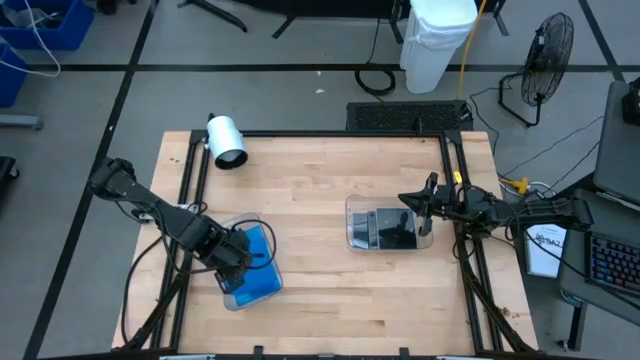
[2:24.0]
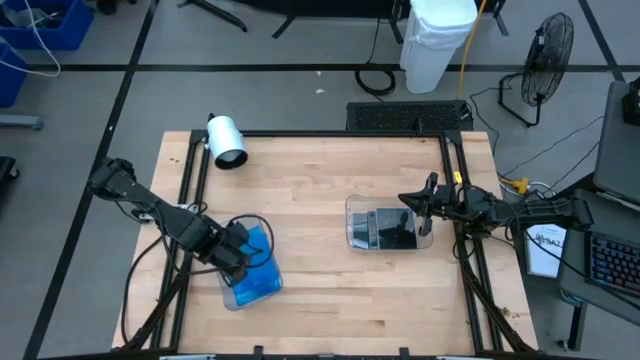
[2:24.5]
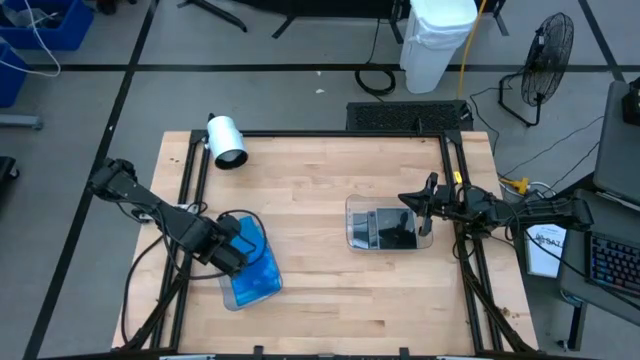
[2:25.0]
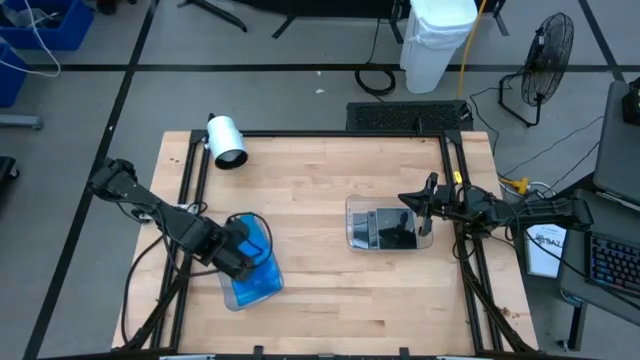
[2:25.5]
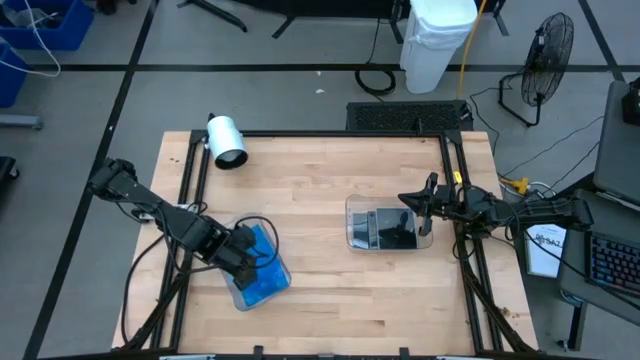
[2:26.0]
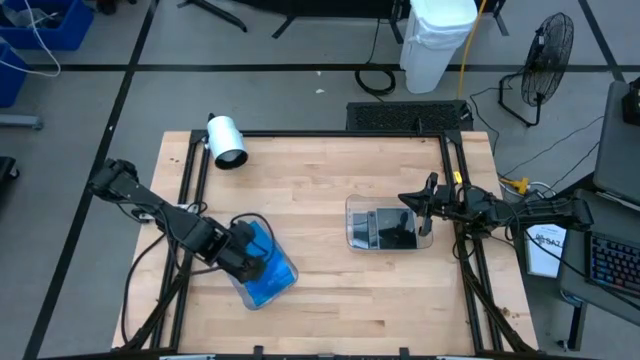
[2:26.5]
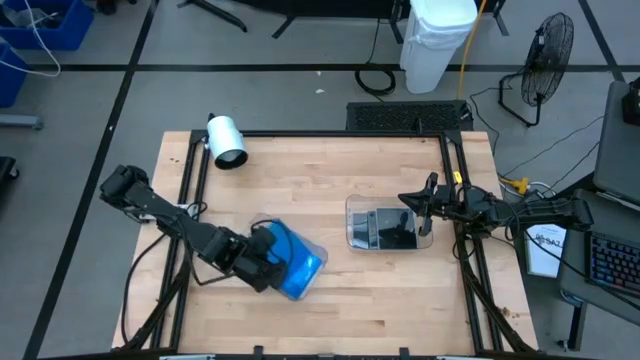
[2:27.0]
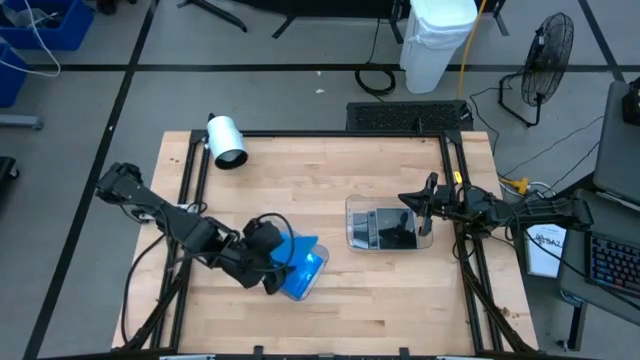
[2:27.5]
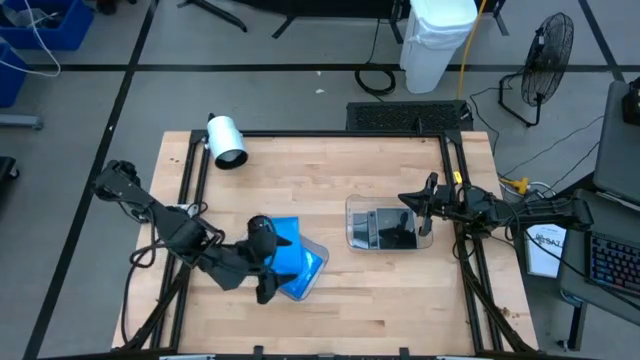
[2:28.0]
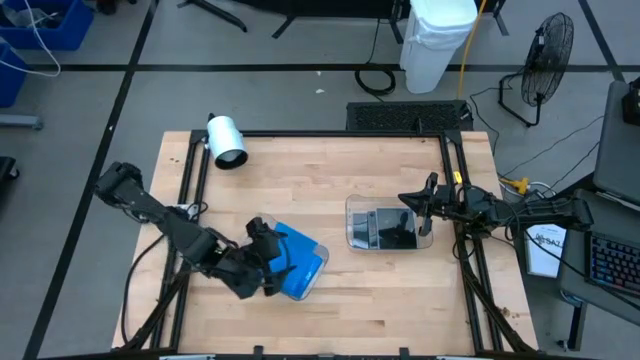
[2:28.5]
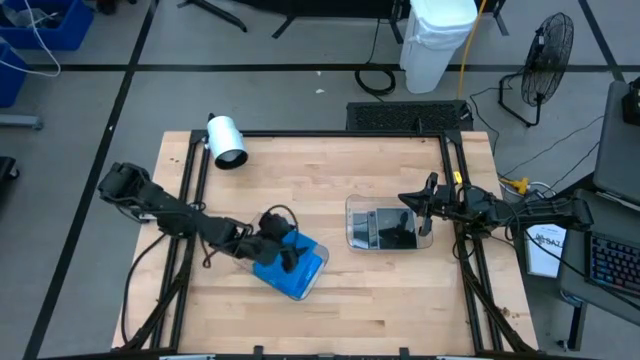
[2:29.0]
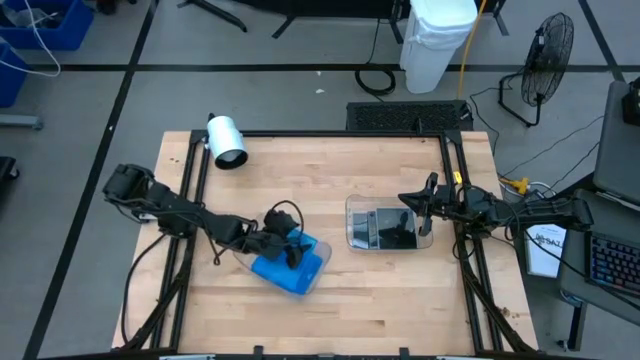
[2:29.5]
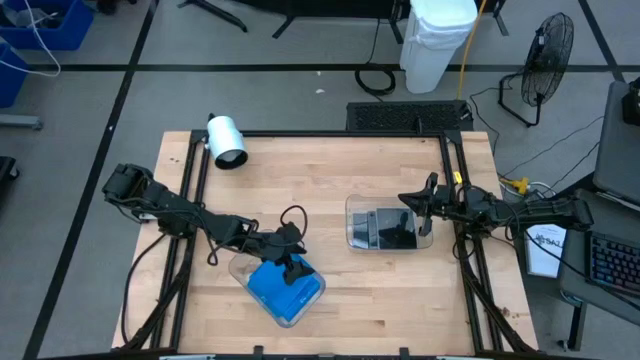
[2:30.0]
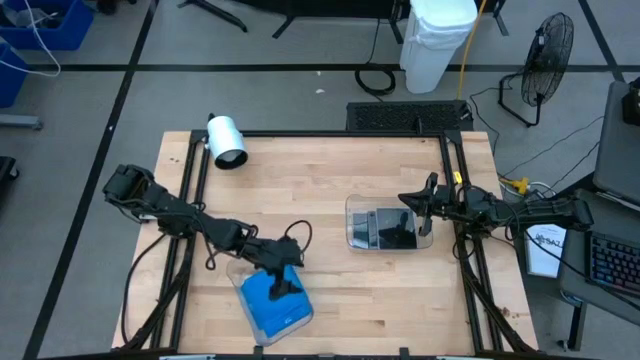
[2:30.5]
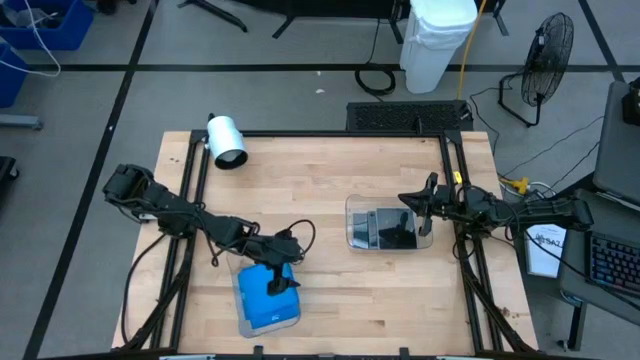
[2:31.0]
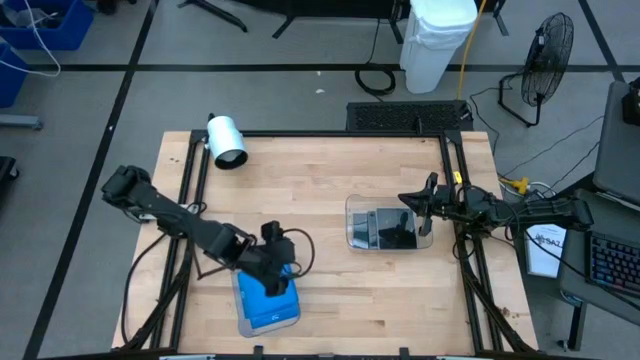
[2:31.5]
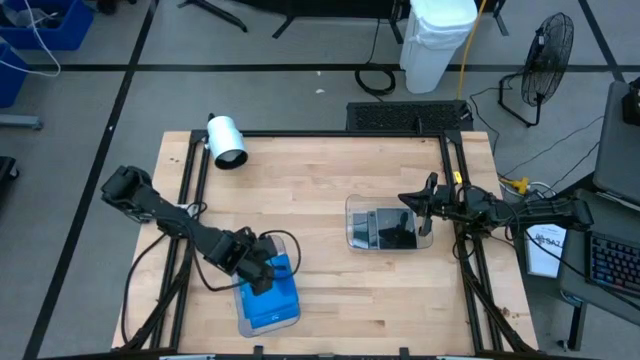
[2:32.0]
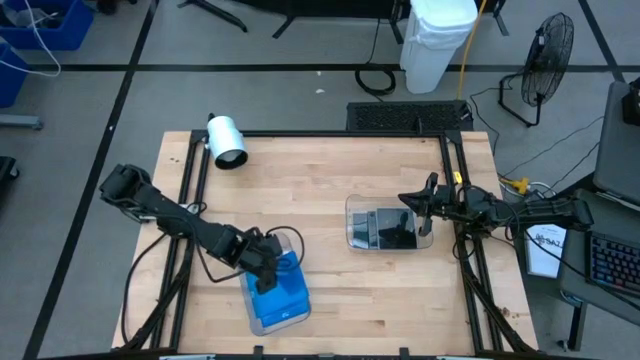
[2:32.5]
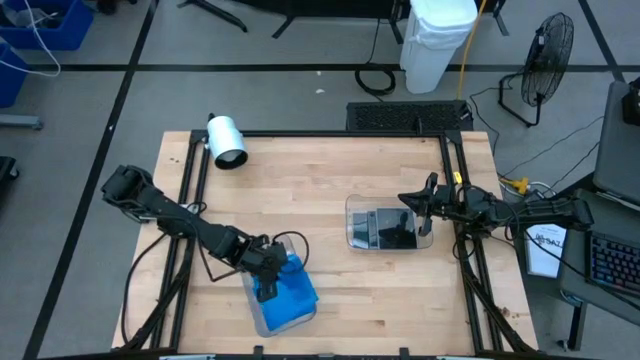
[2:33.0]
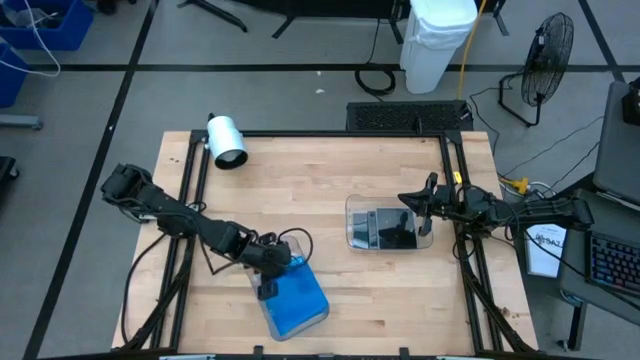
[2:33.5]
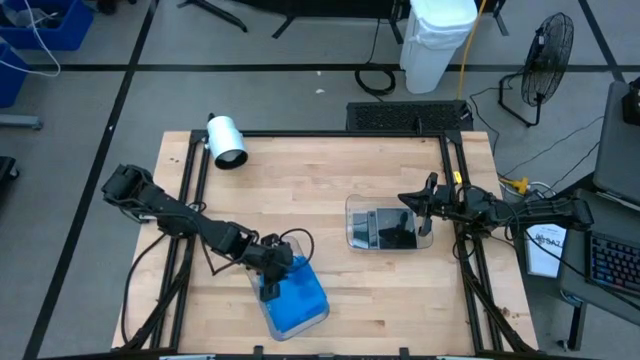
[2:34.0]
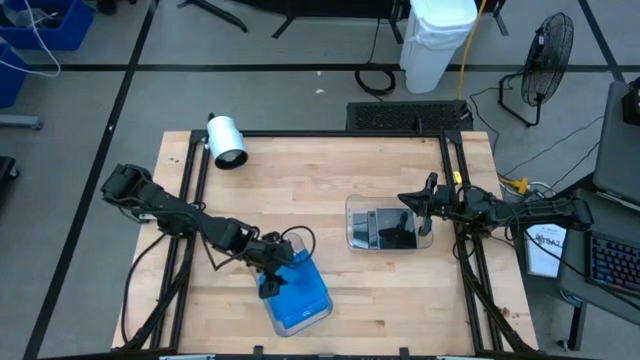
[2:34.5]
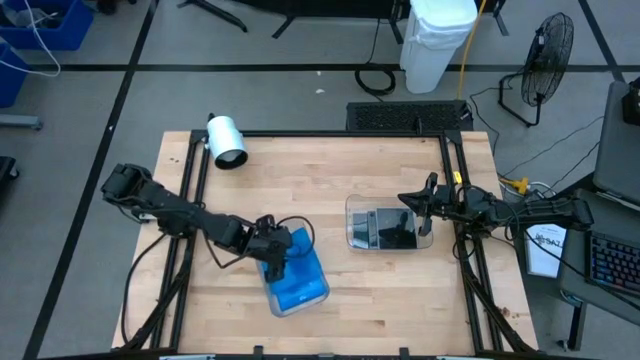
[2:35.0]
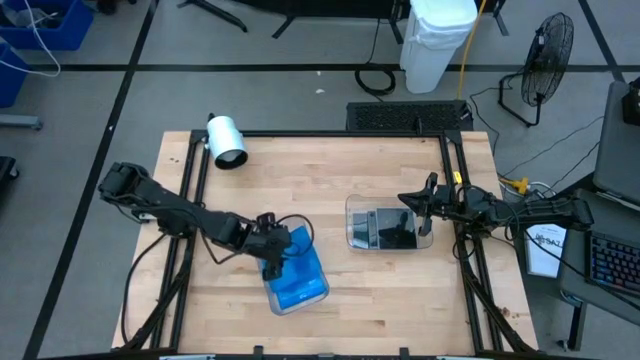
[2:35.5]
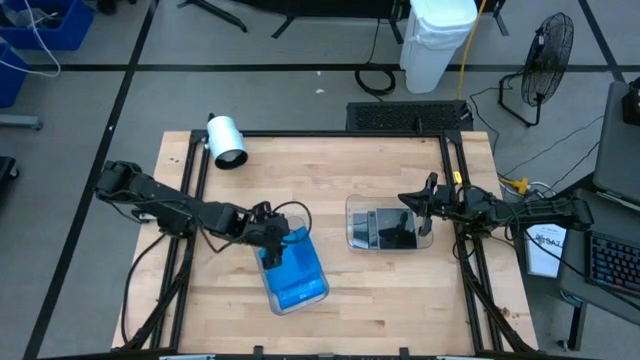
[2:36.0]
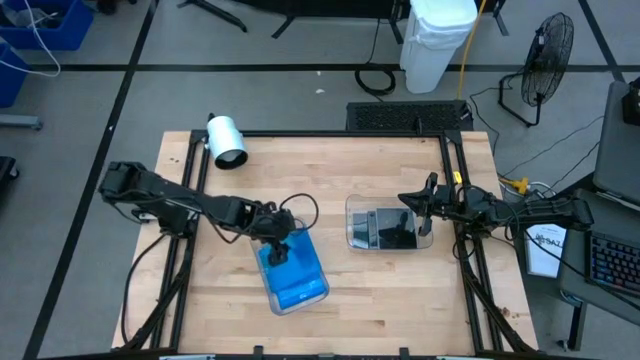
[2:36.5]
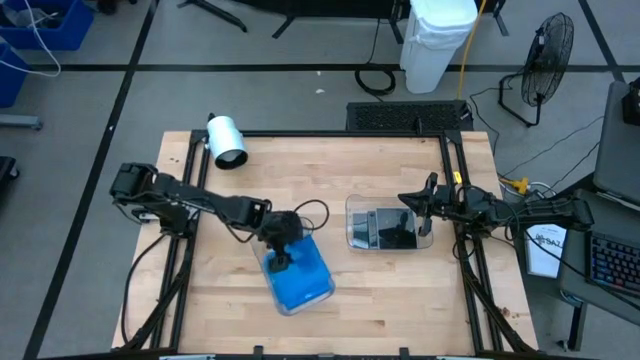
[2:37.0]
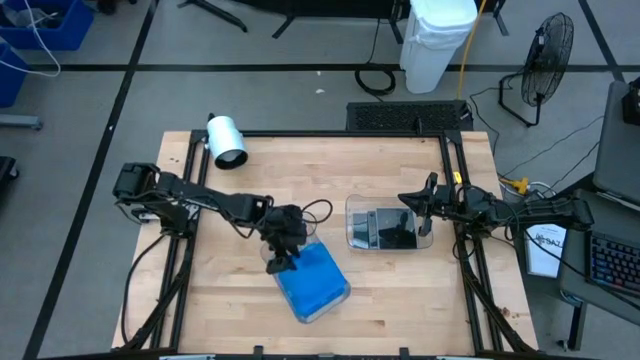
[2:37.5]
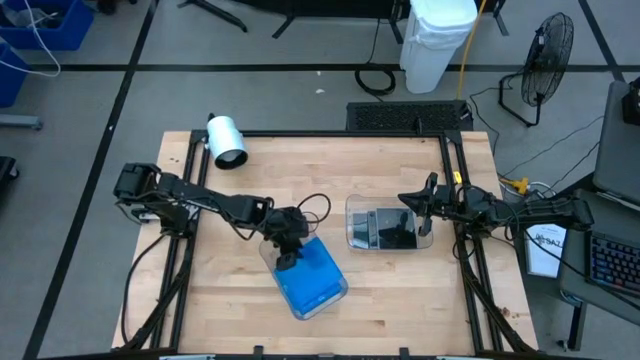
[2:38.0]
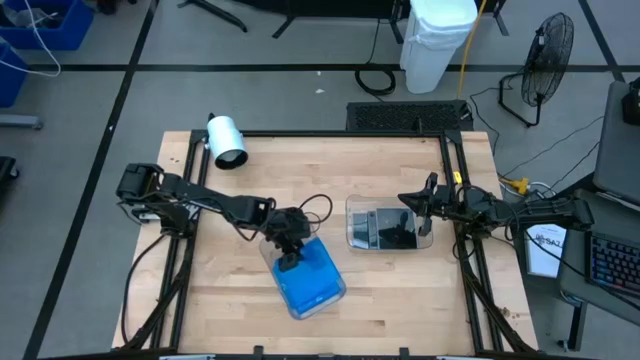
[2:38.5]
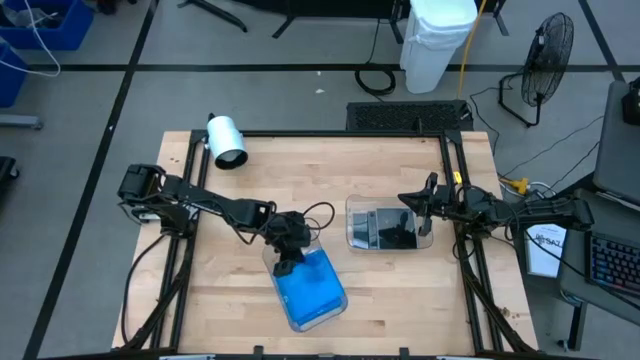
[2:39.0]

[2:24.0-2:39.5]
Task: Pick & place jewel cases by type
Put the blue CD case into the left transparent bin

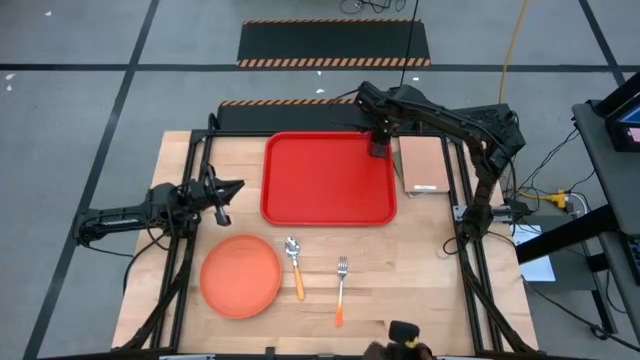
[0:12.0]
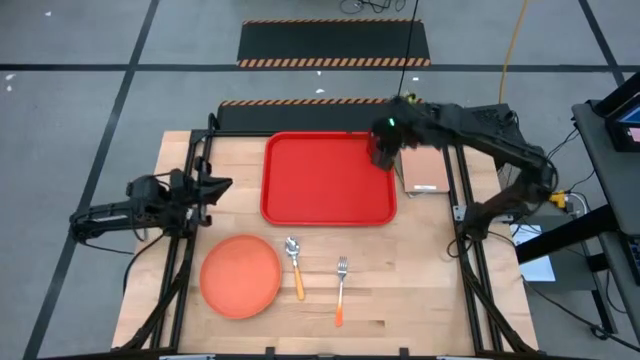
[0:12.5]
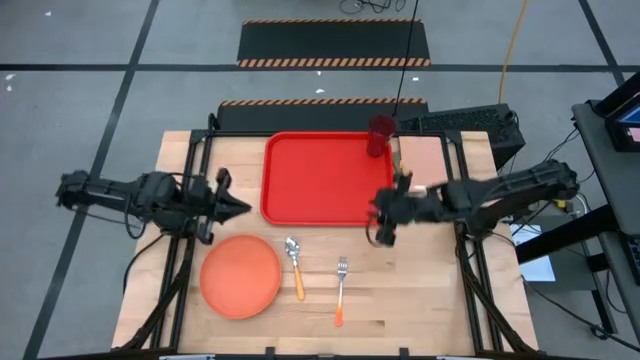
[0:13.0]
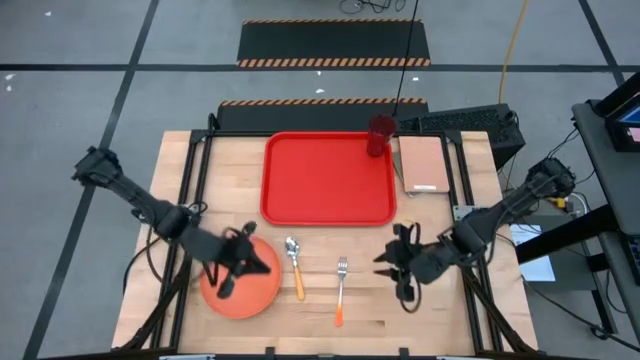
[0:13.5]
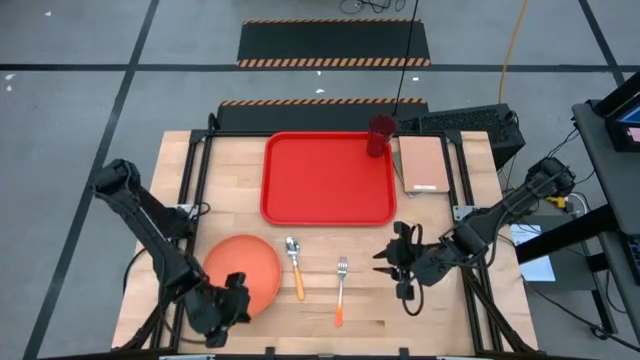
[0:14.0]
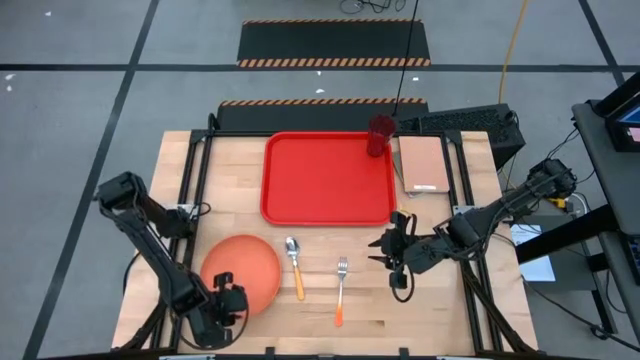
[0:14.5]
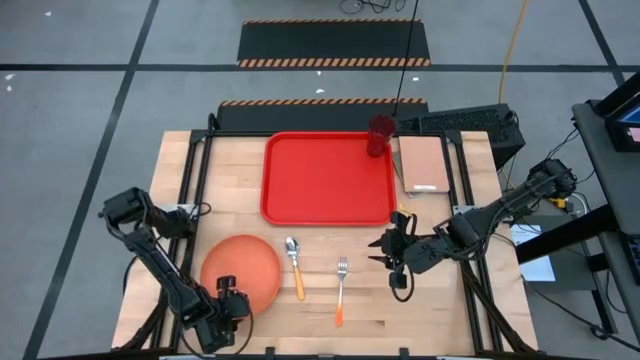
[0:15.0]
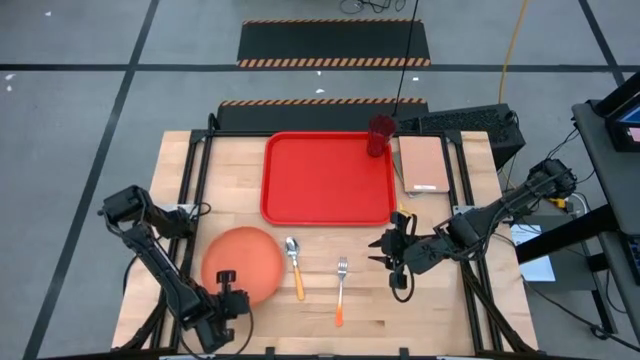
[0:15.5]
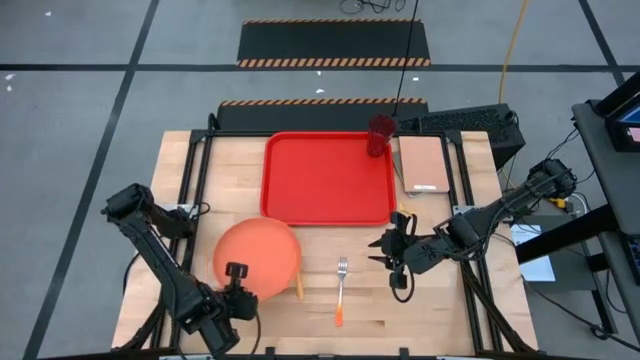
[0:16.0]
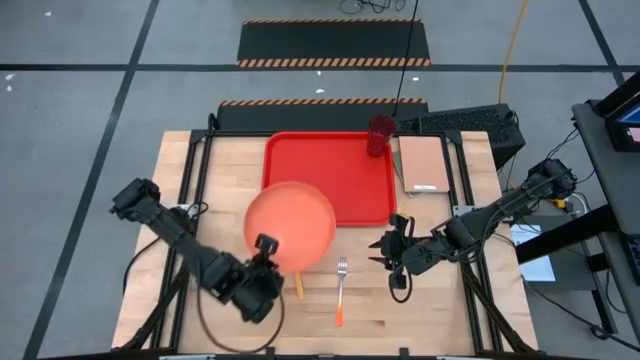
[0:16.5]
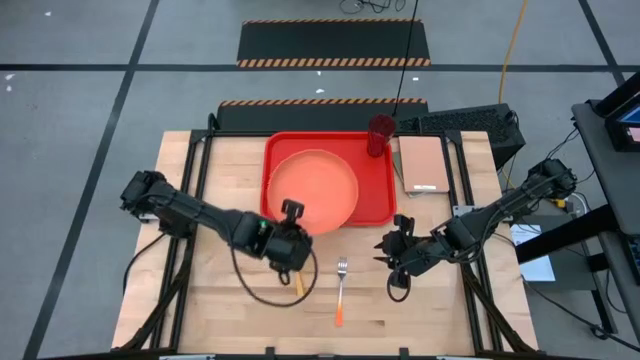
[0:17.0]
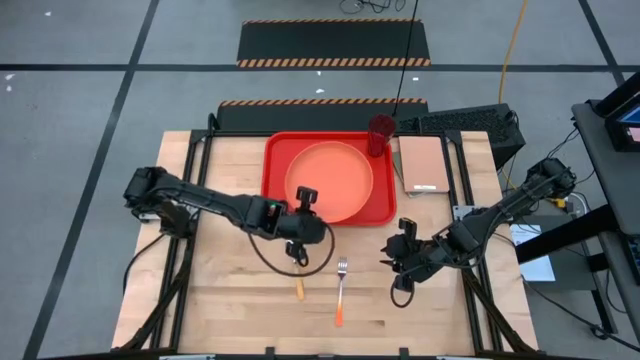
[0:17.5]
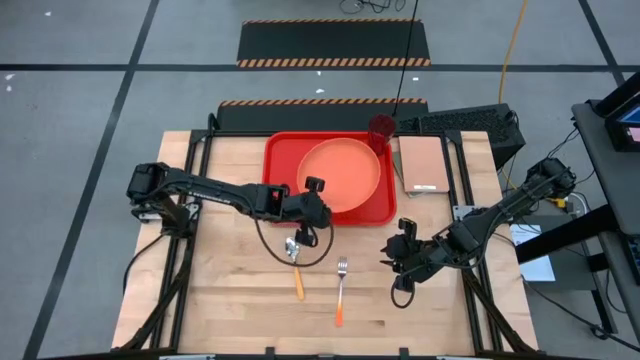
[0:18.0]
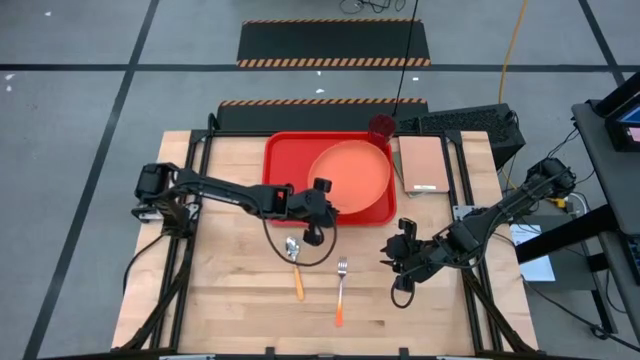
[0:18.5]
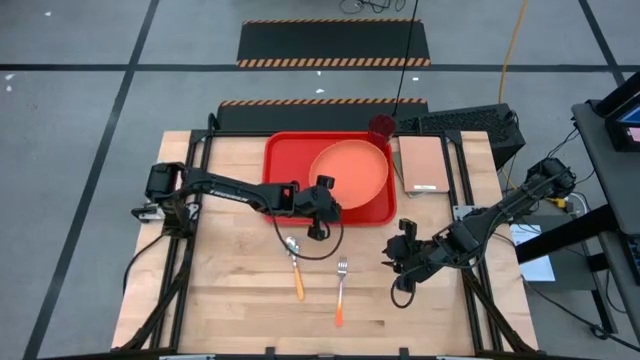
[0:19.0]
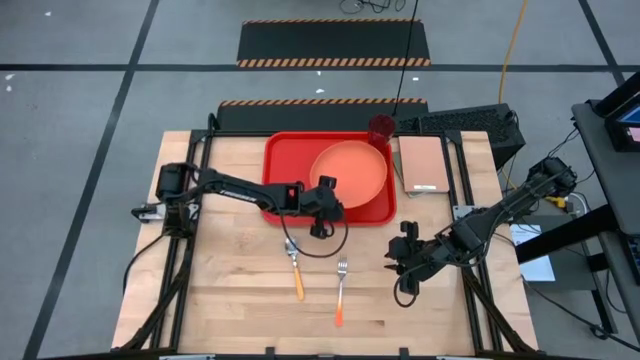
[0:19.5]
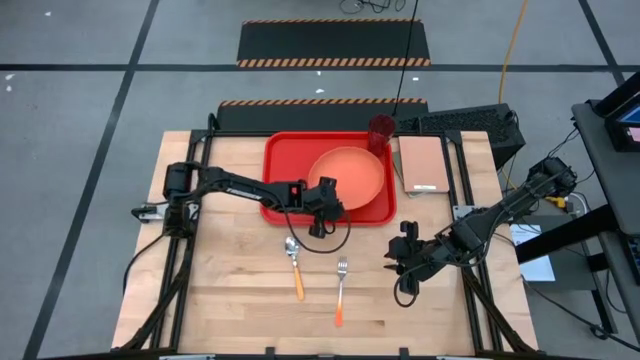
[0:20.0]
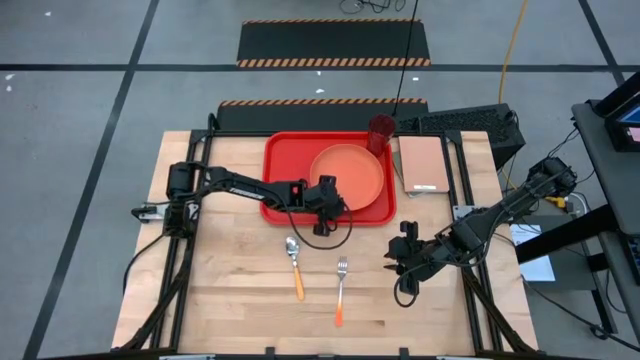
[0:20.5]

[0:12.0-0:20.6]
Task: Pick and place plate/cup/fork/spoon on tray
Put the orange plate under the red cup on the red serving tray
